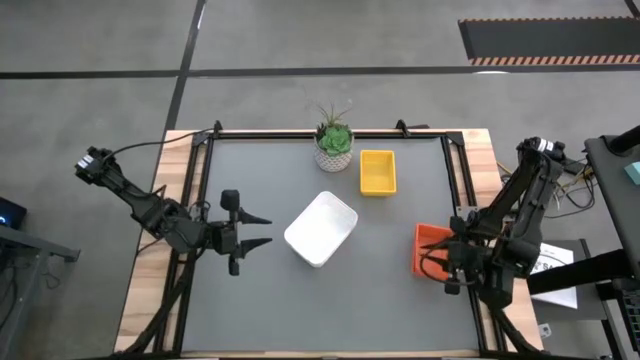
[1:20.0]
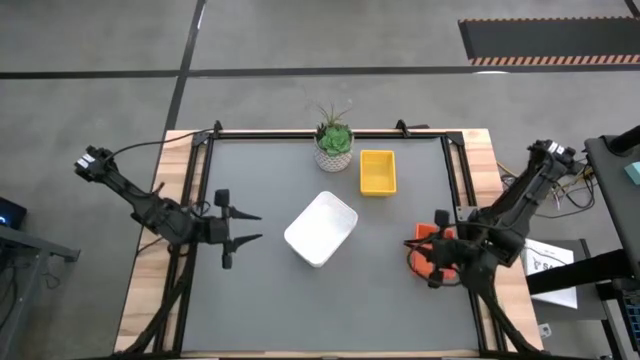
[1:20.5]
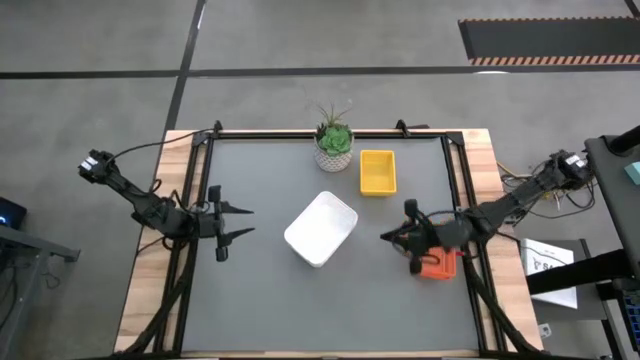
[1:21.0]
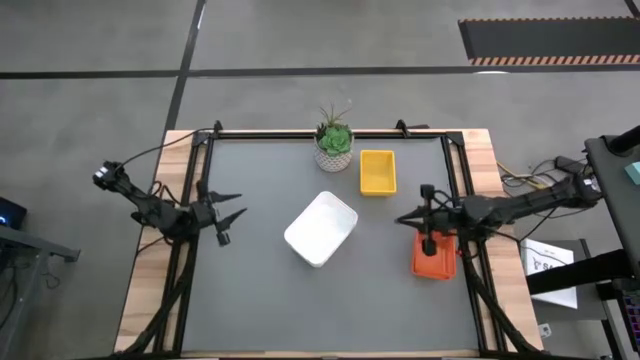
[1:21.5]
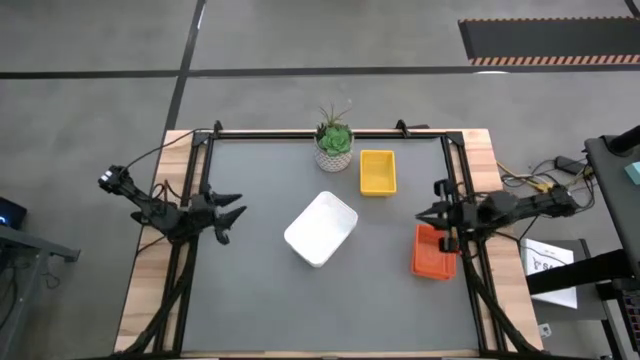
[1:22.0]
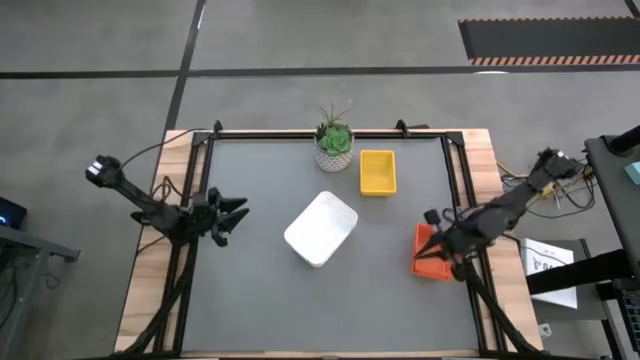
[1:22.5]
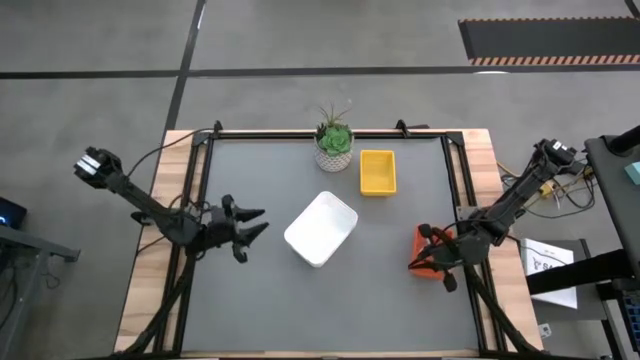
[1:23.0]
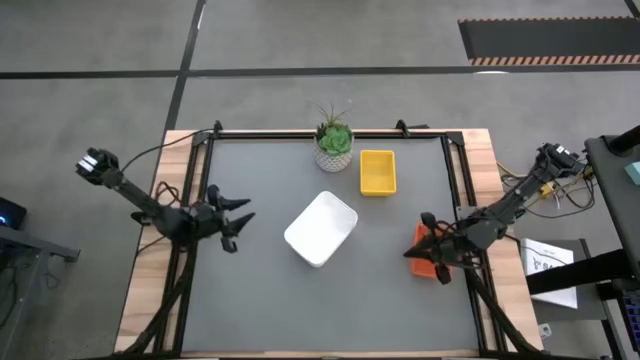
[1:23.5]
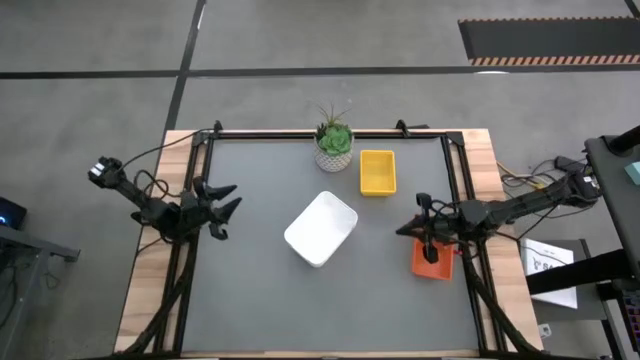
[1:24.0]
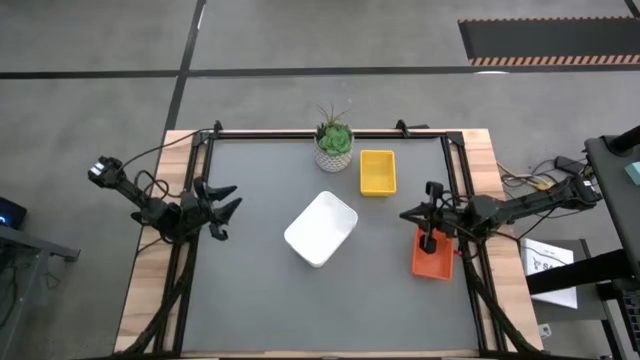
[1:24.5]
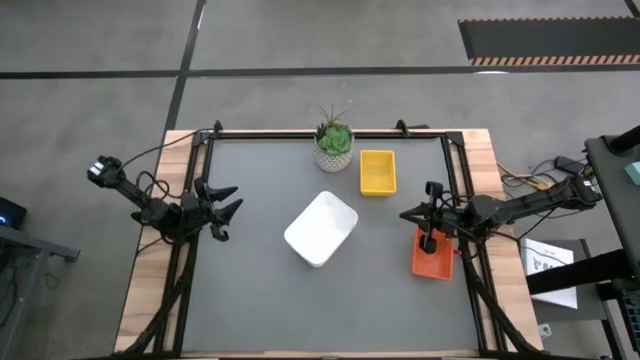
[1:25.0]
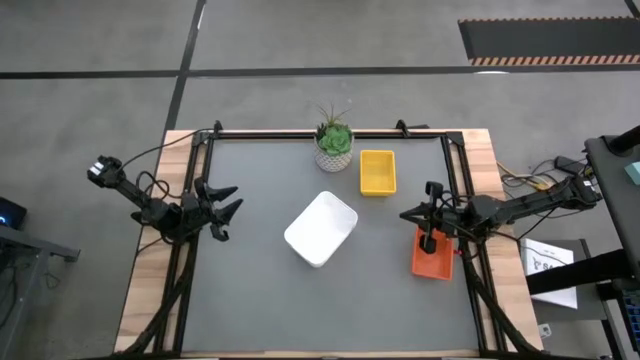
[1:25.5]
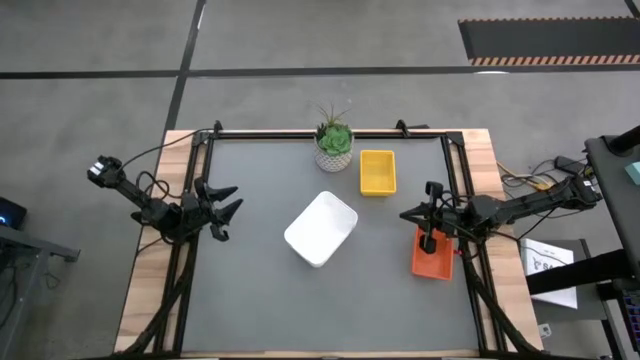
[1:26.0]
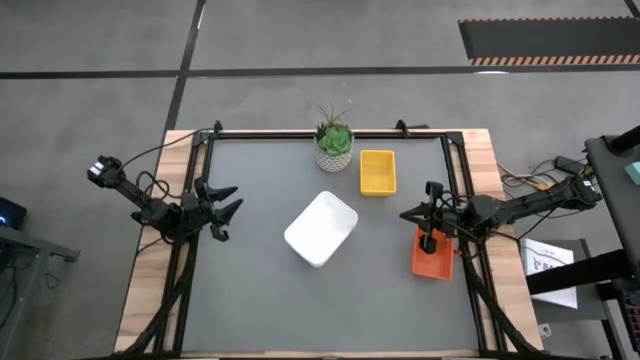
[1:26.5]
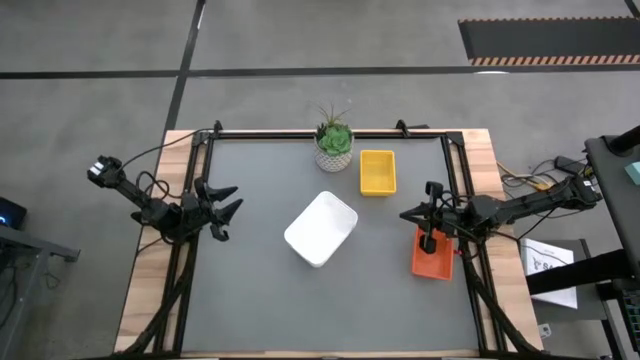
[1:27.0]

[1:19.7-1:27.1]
Return to Home Position
